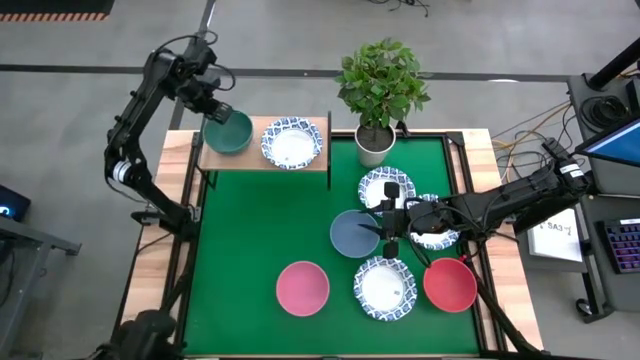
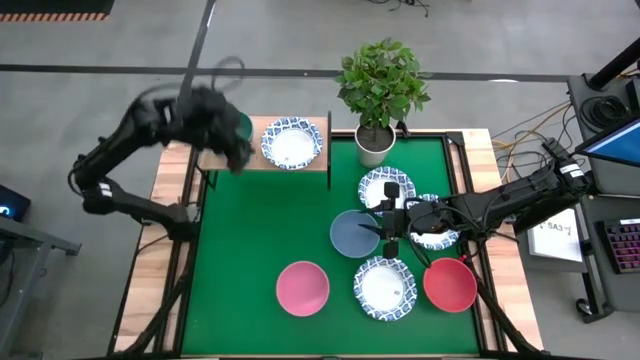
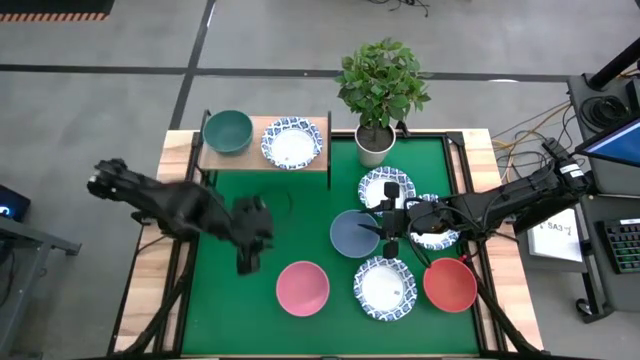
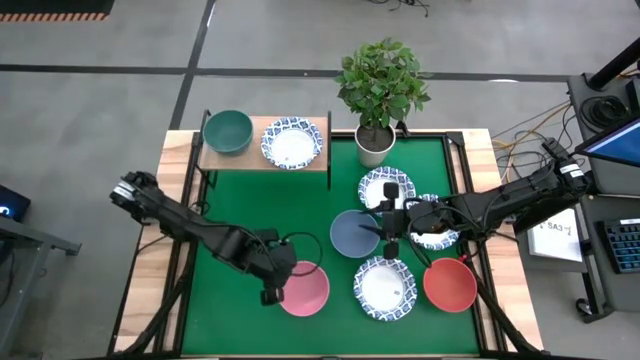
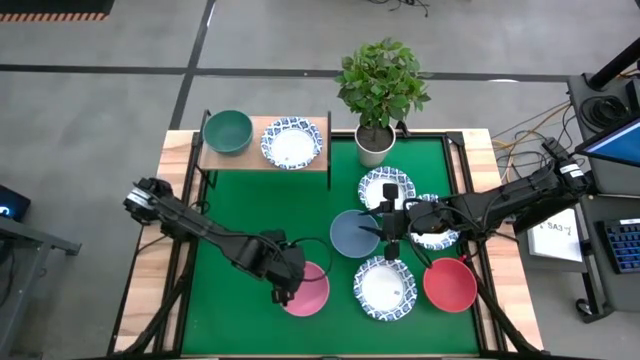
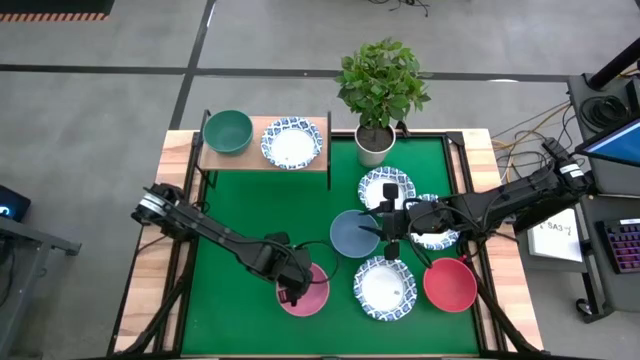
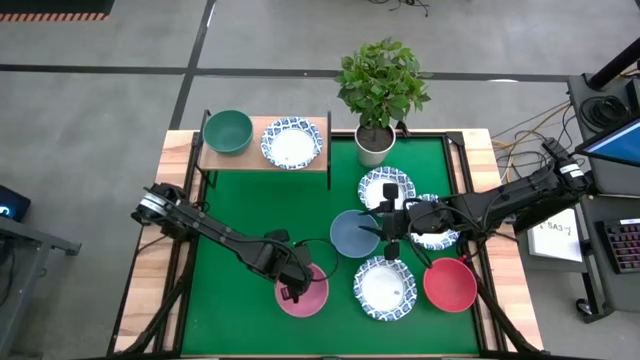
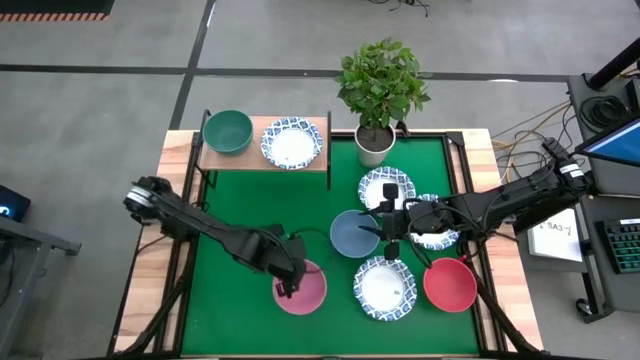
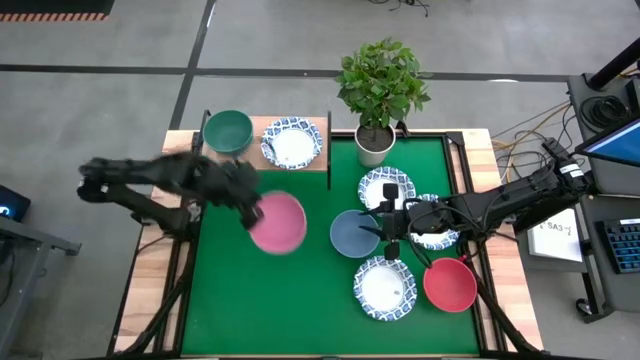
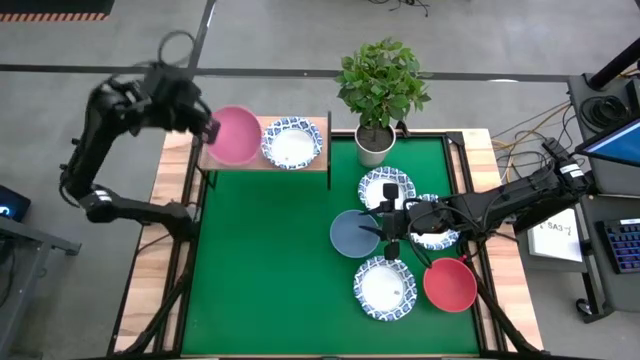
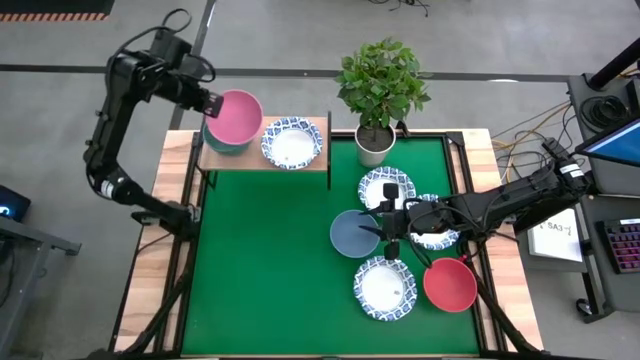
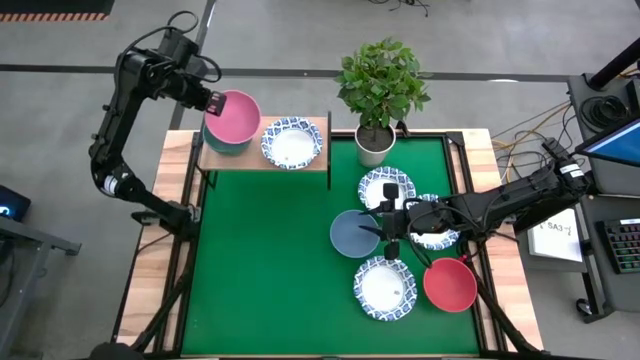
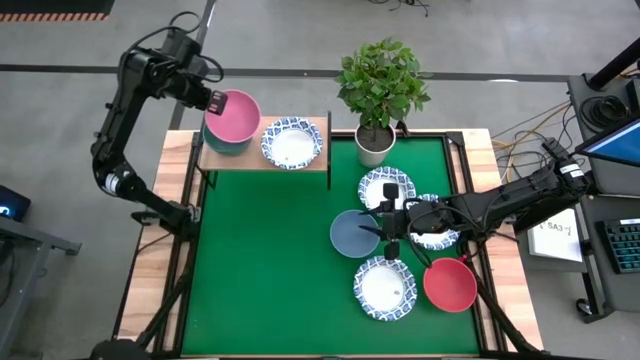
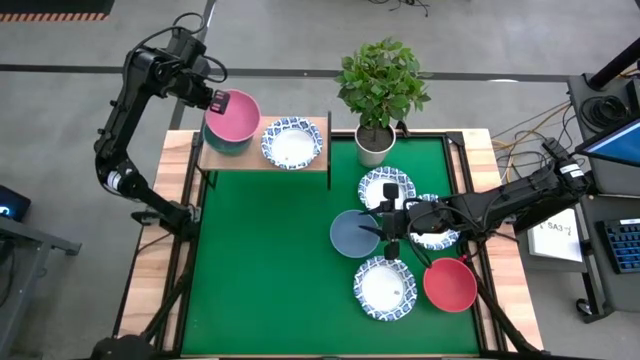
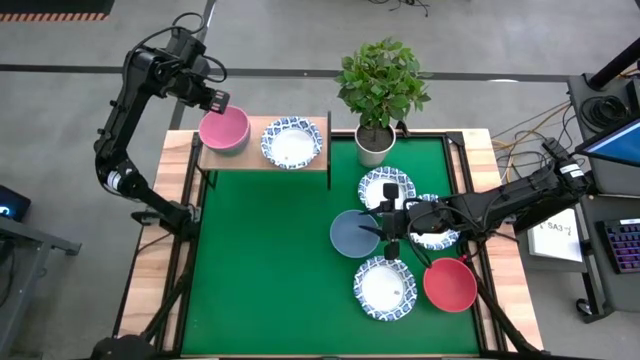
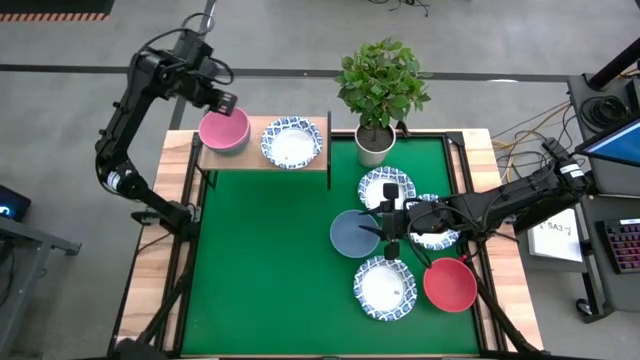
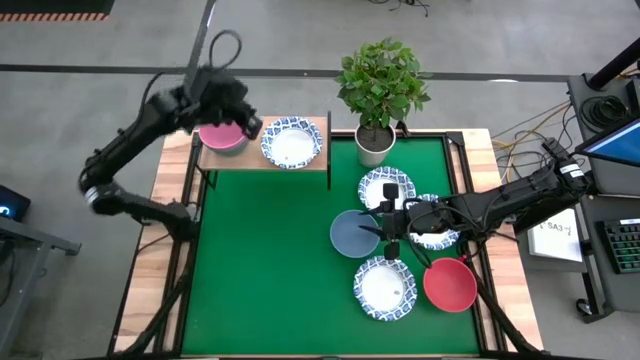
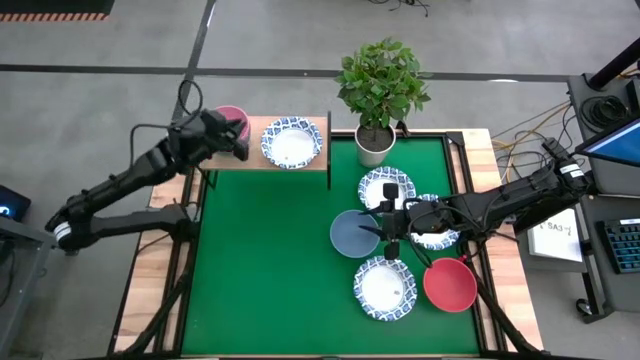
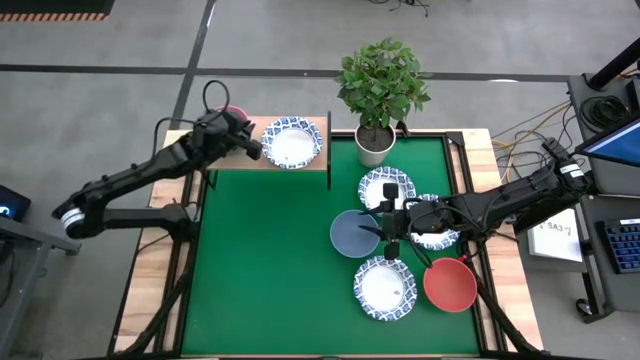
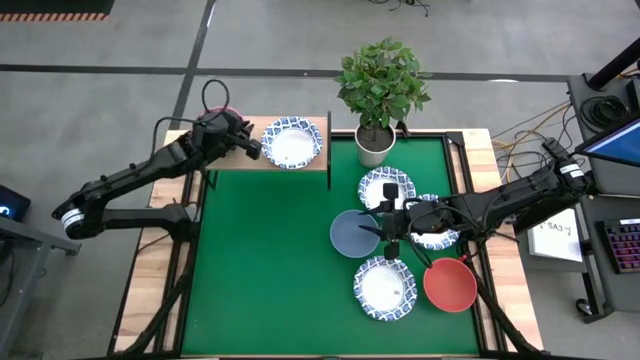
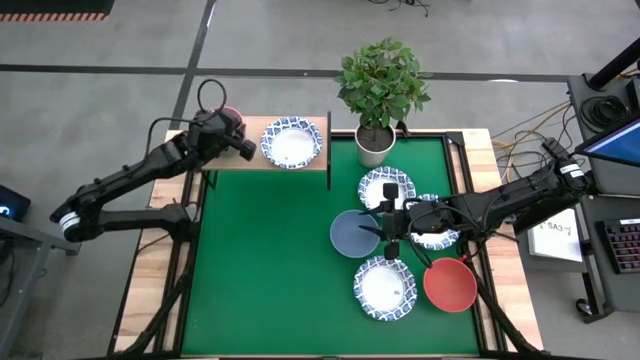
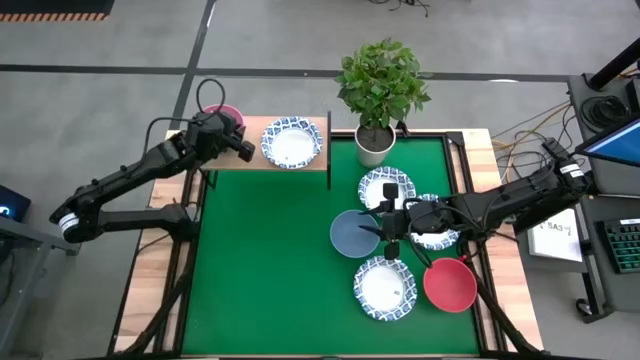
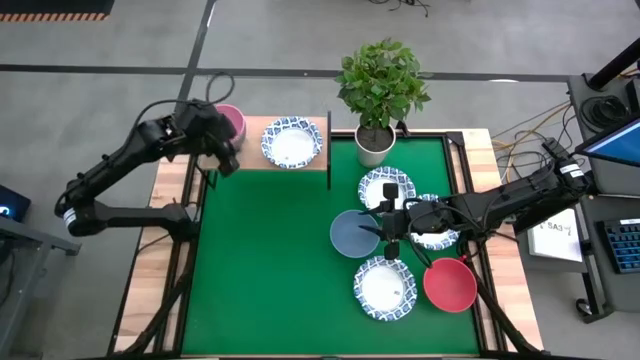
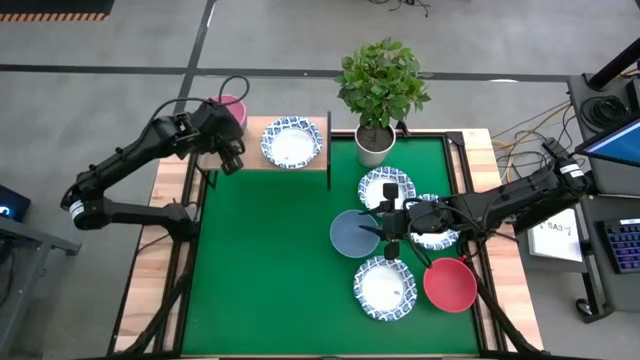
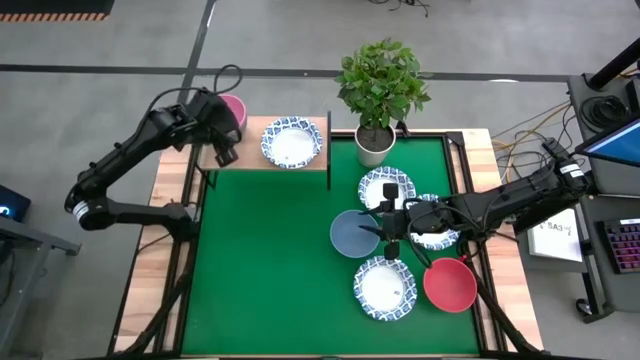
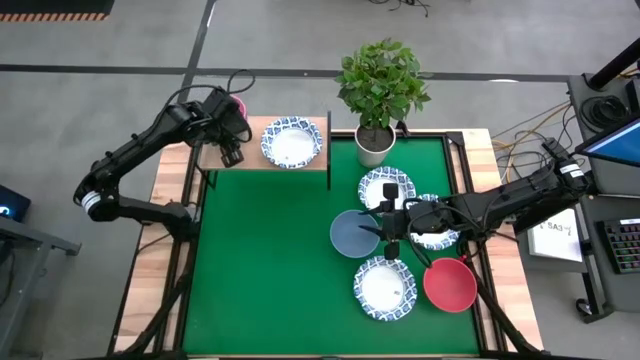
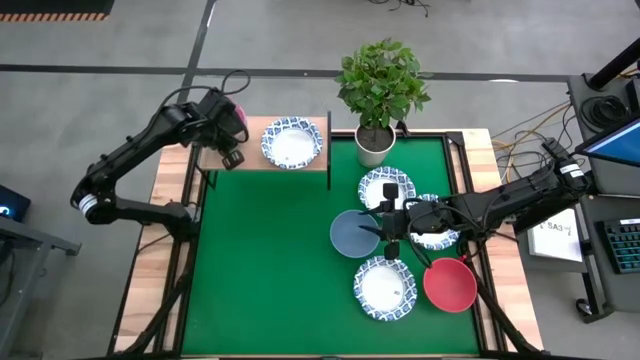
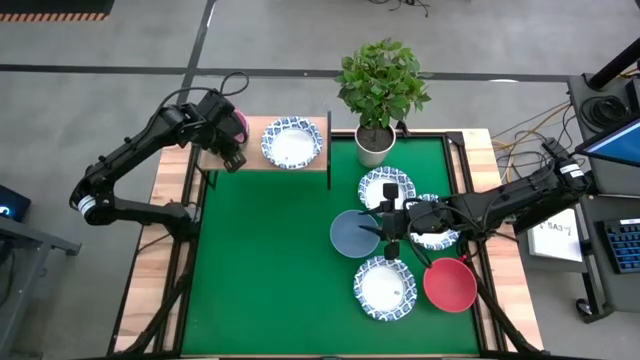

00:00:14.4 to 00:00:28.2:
Task: Place and stack bowls onto a shelf
Stack the pink bowl on top of the green bowl on the shelf

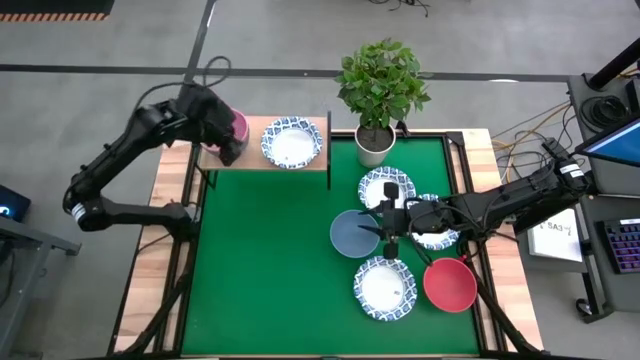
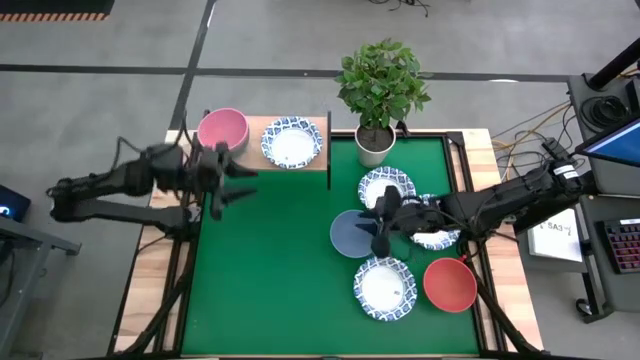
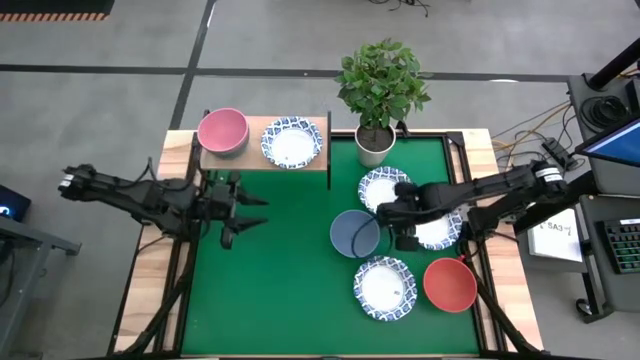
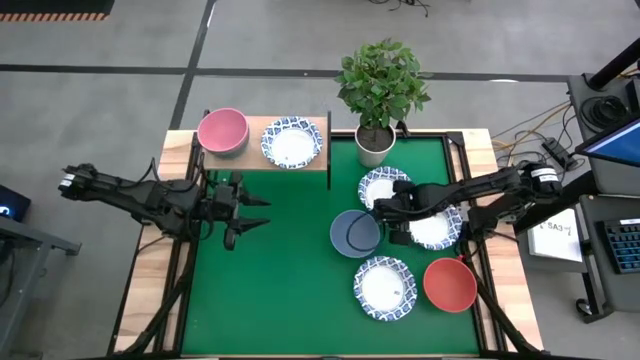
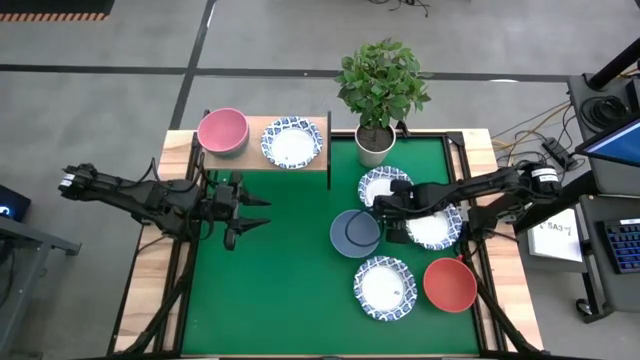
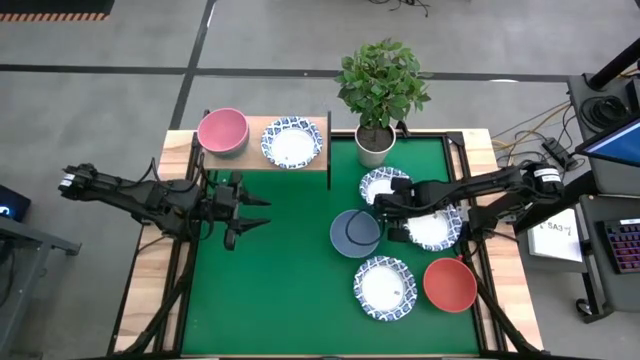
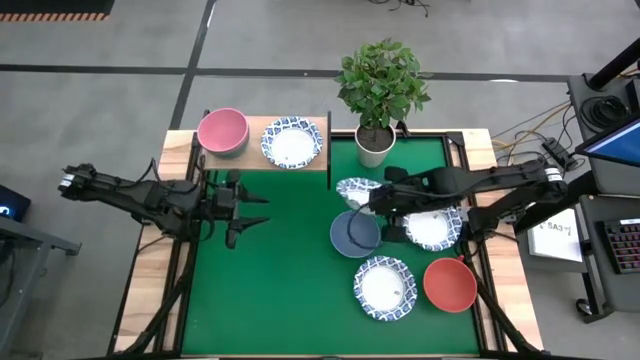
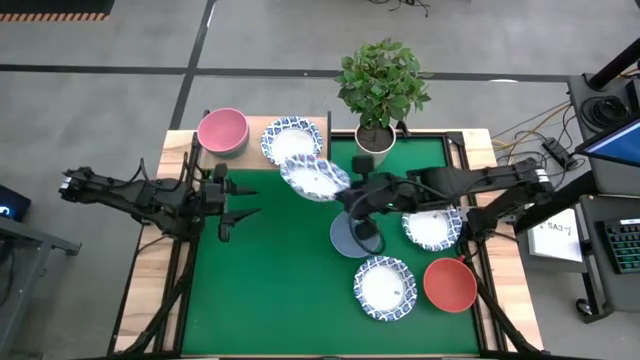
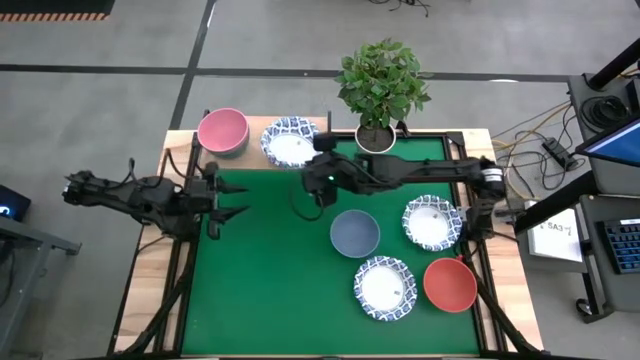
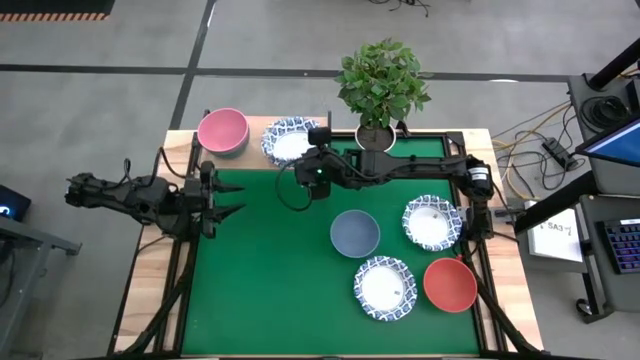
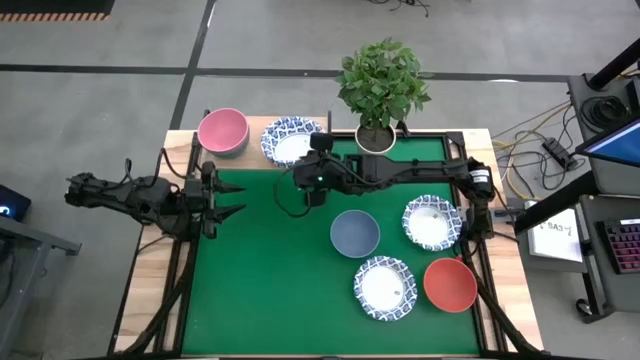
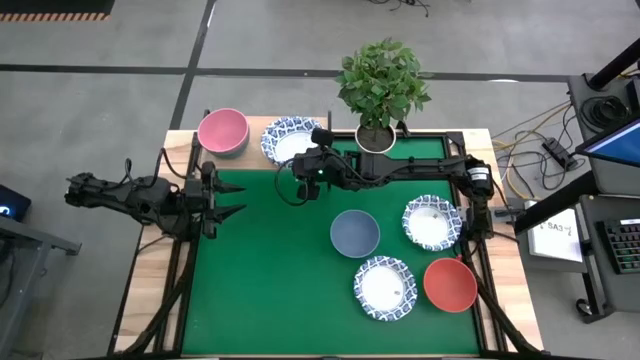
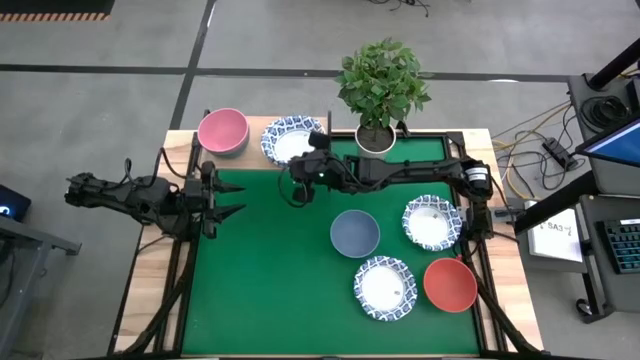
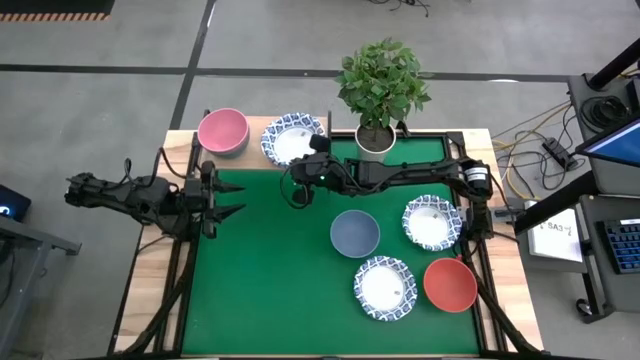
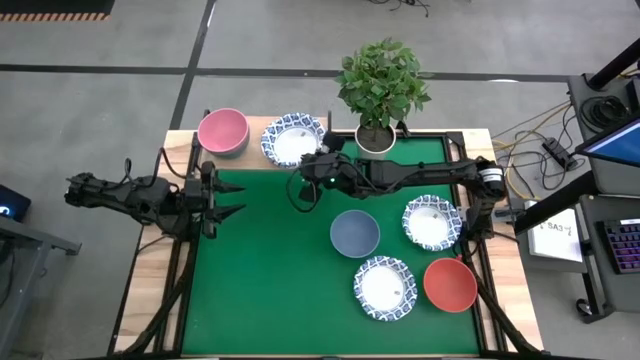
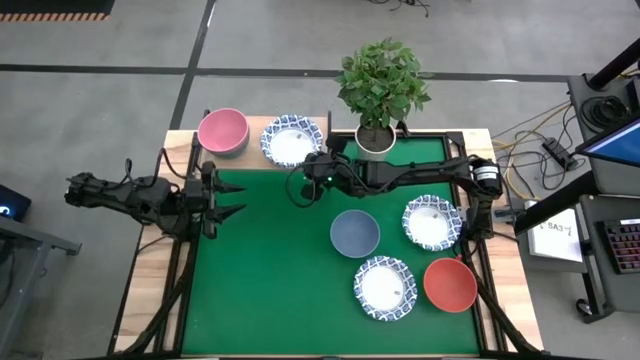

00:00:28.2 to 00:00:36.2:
Stack the white patterned bowl on top of the white patterned bowl on the shelf
